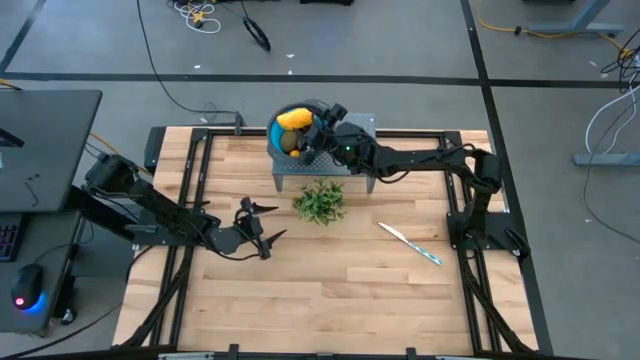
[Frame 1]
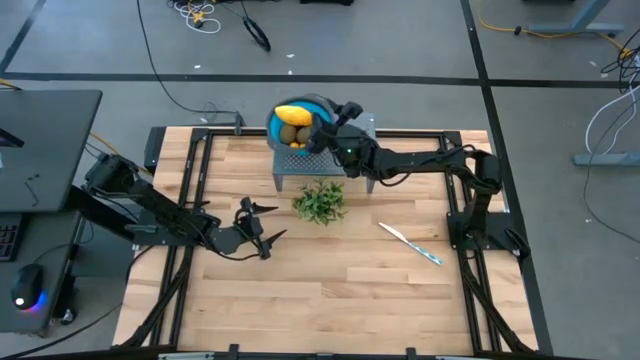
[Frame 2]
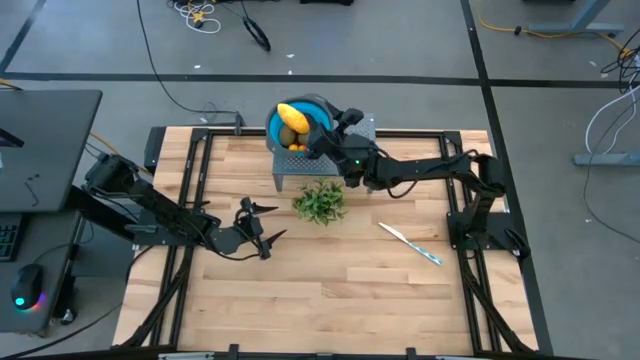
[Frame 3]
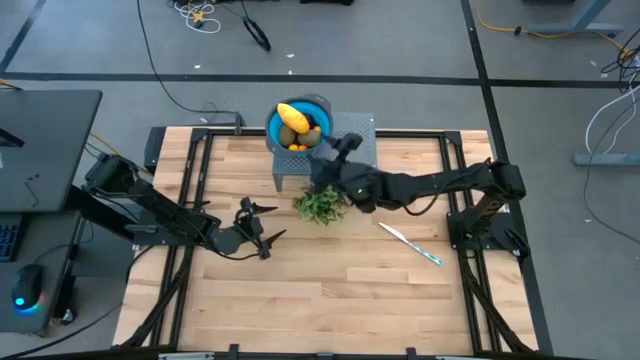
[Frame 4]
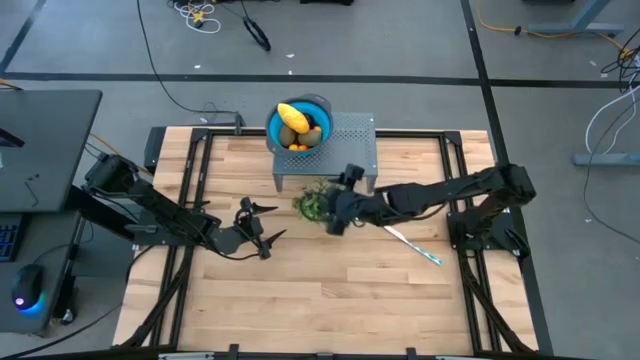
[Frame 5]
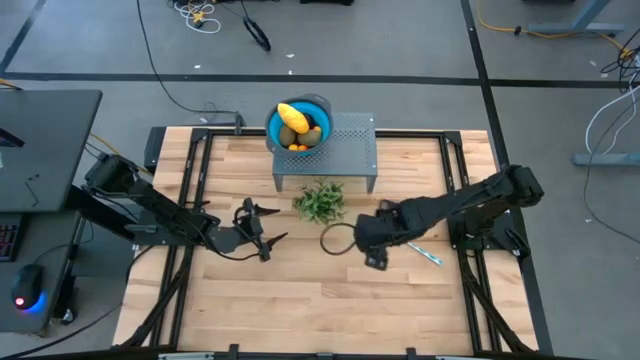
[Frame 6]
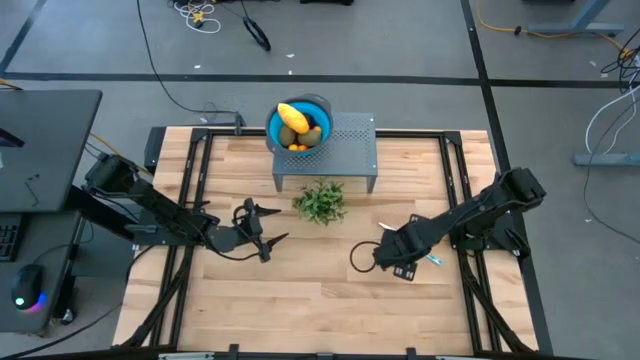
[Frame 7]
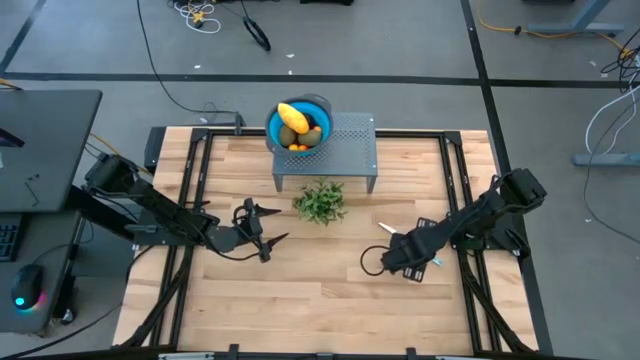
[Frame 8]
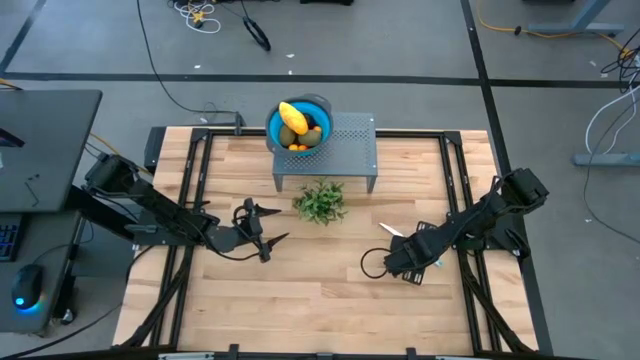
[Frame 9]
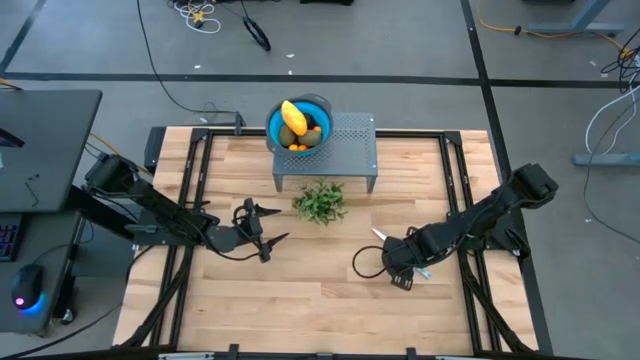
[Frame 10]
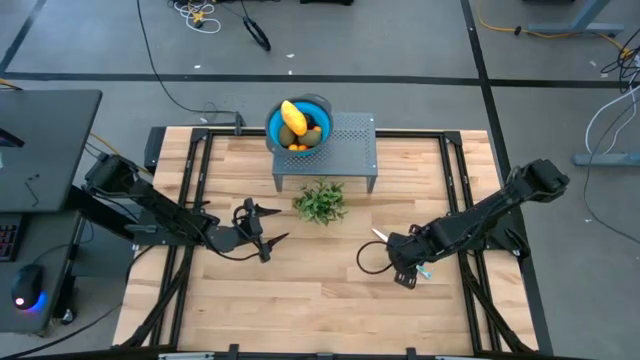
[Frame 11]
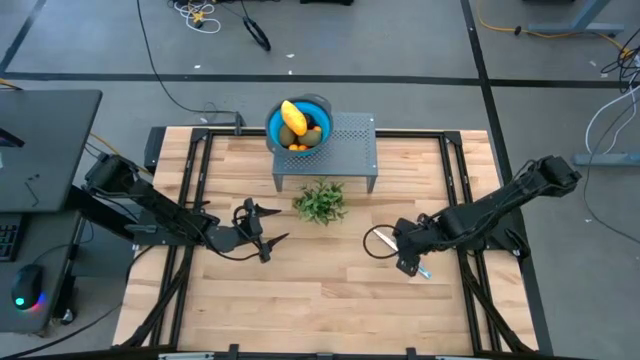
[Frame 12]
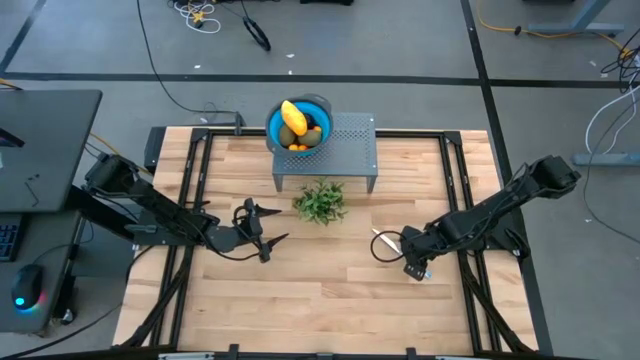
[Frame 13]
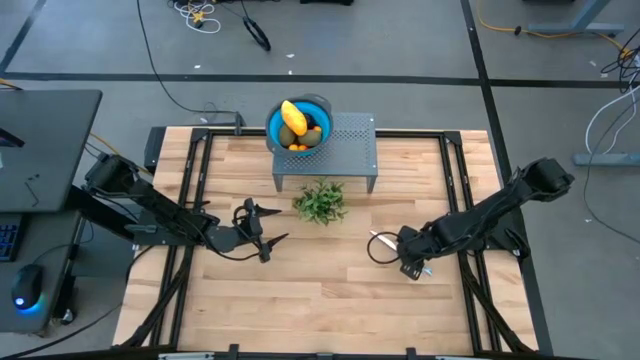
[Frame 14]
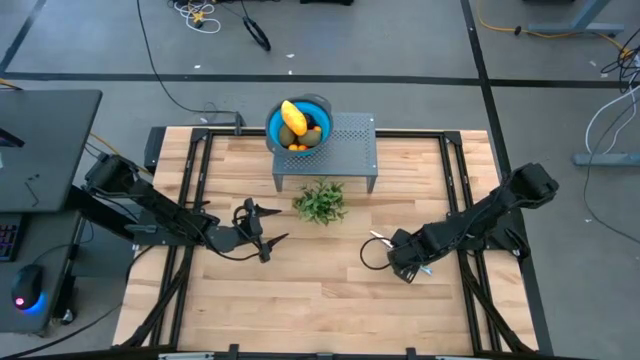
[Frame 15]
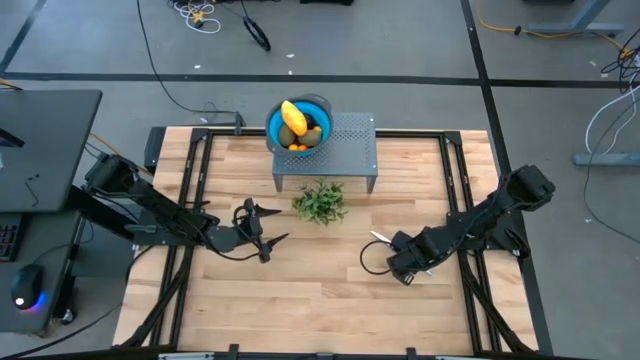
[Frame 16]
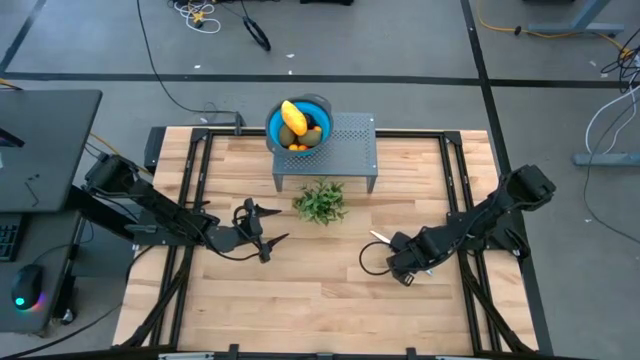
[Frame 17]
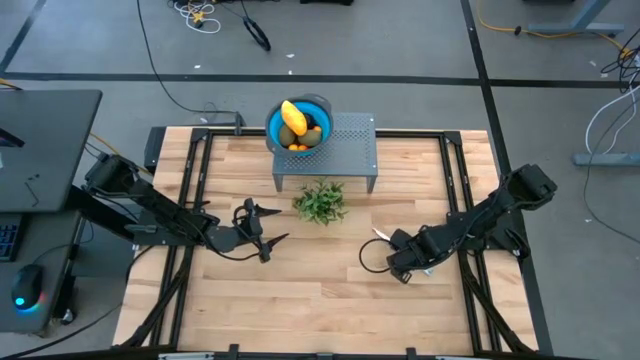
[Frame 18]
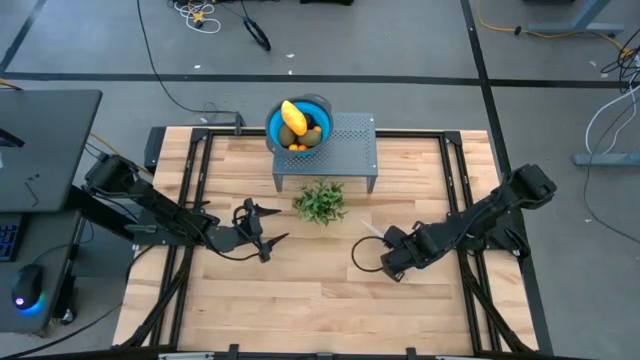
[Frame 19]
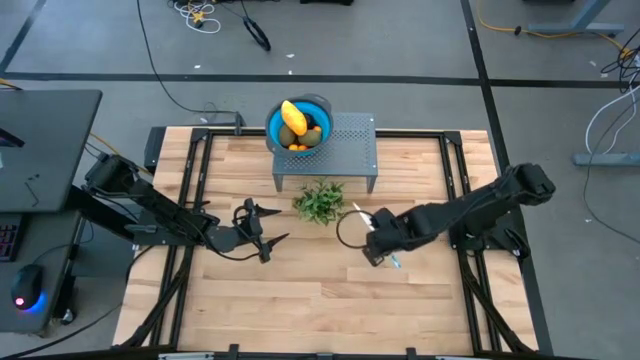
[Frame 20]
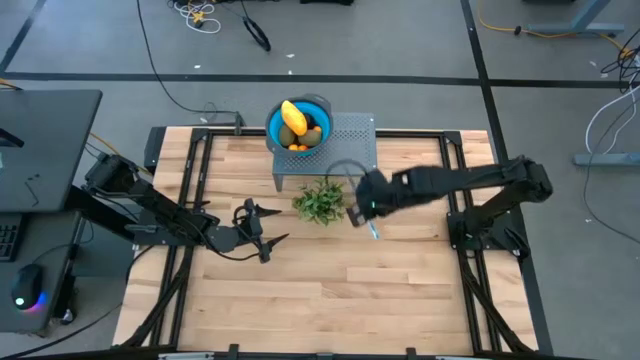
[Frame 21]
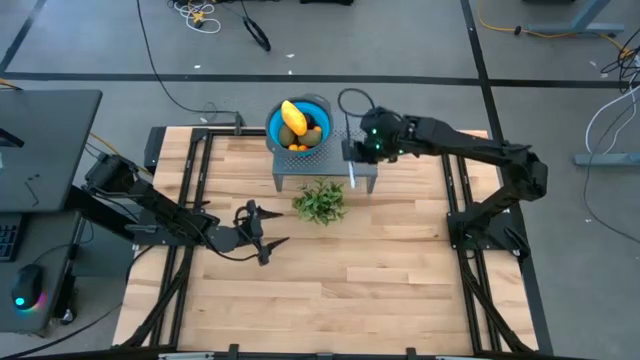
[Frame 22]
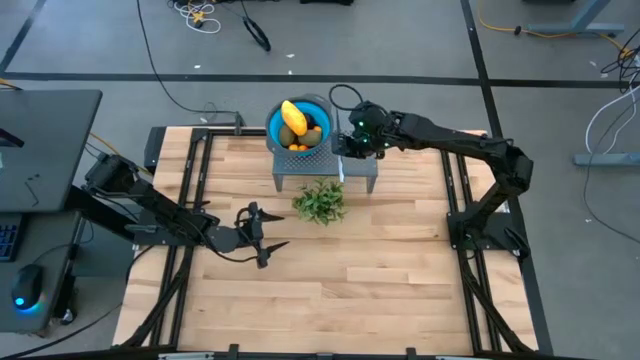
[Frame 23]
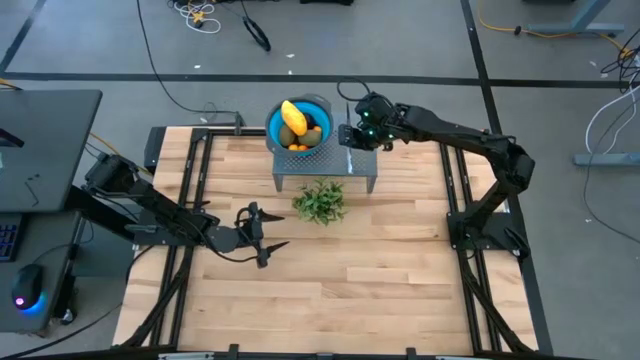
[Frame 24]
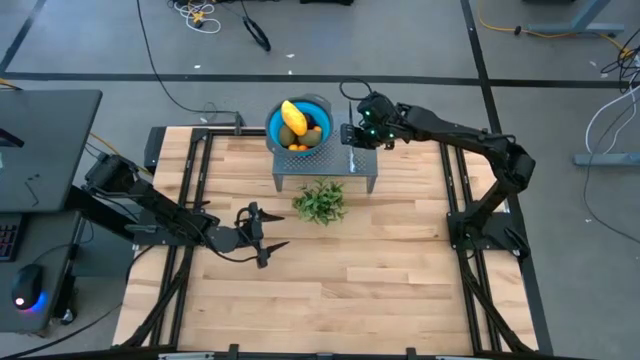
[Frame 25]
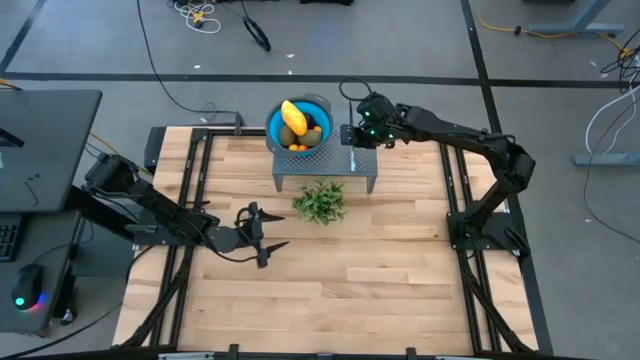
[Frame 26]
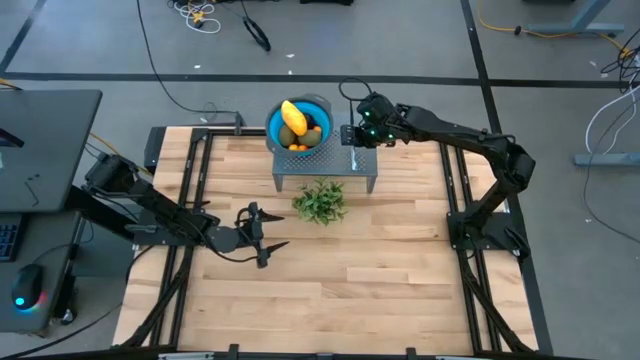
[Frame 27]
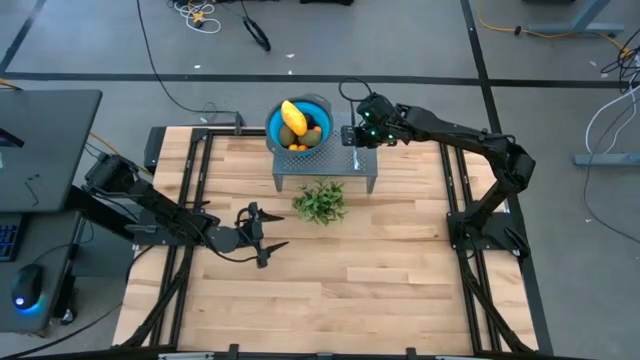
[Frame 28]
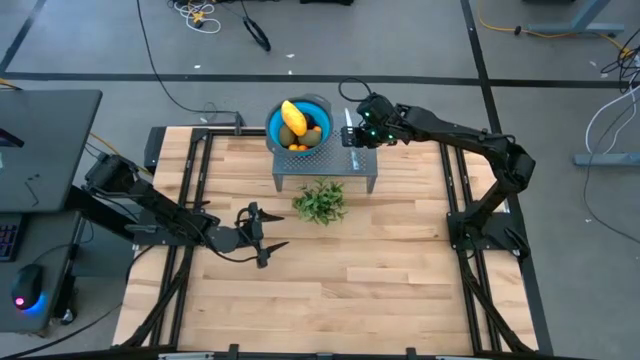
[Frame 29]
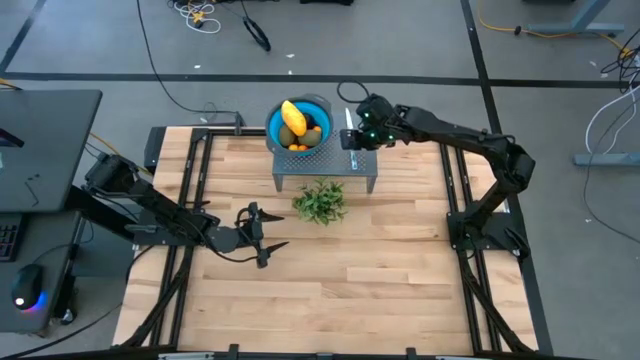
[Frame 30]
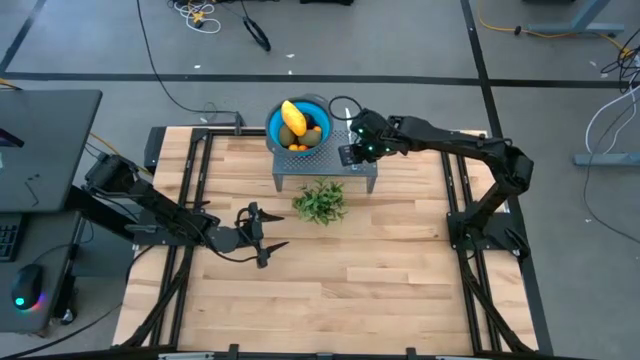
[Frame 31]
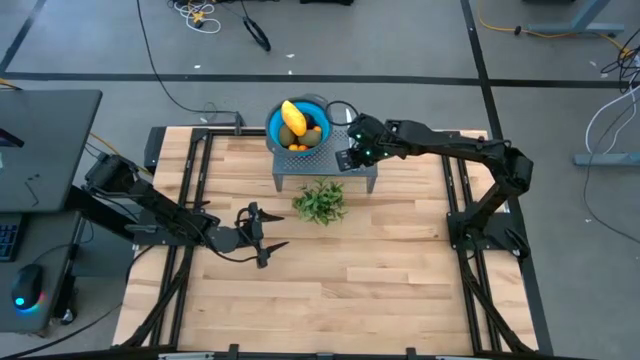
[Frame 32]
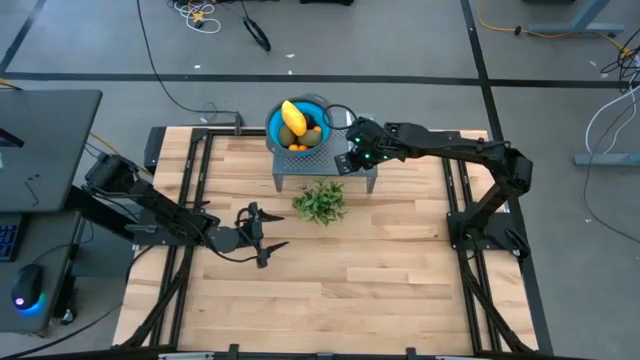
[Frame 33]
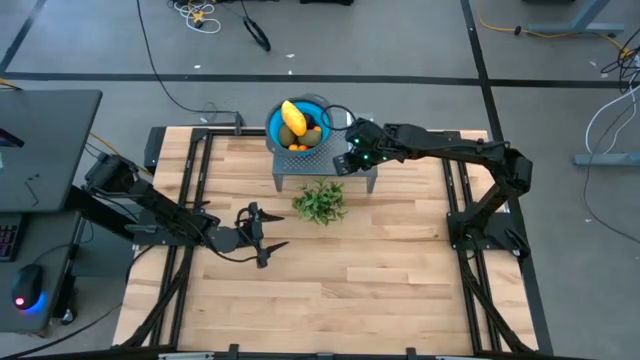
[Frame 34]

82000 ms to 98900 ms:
Task: Pick & Place Fruit
Put the blue knife on the shelf

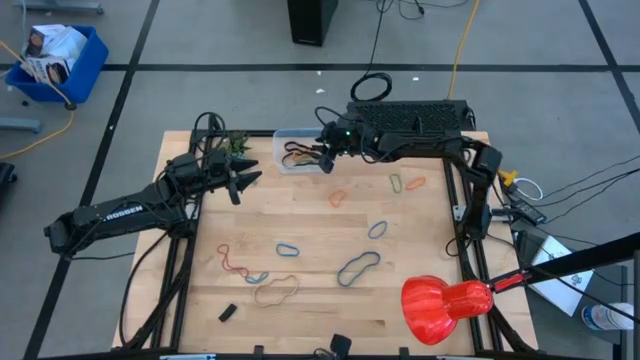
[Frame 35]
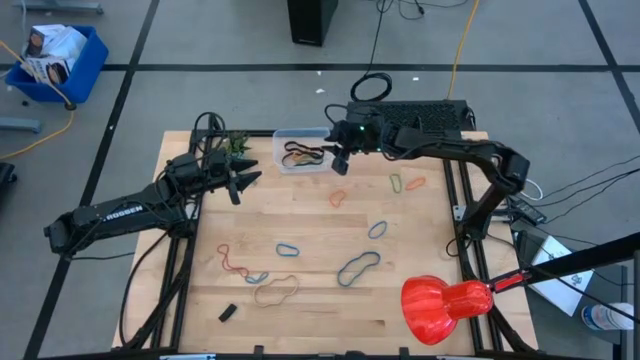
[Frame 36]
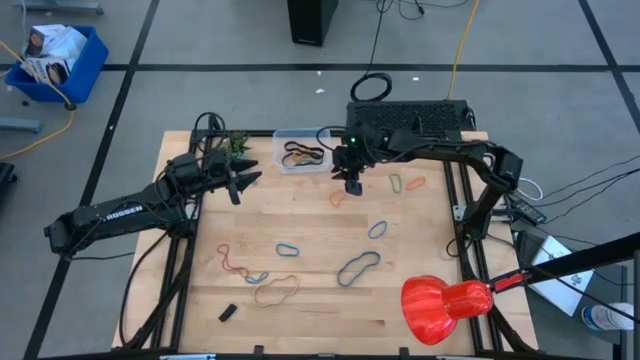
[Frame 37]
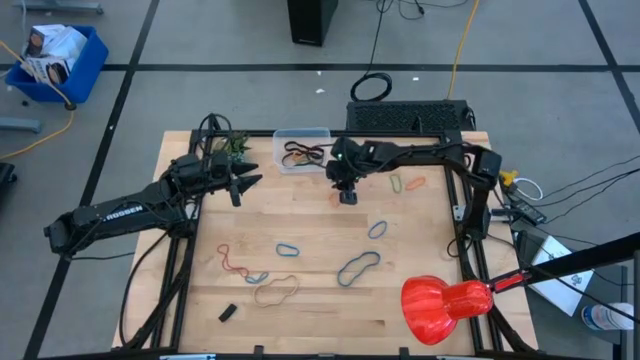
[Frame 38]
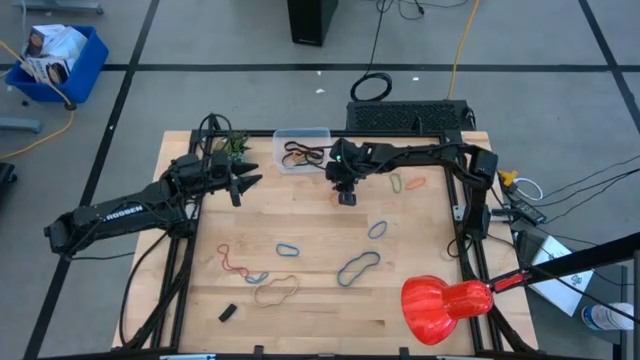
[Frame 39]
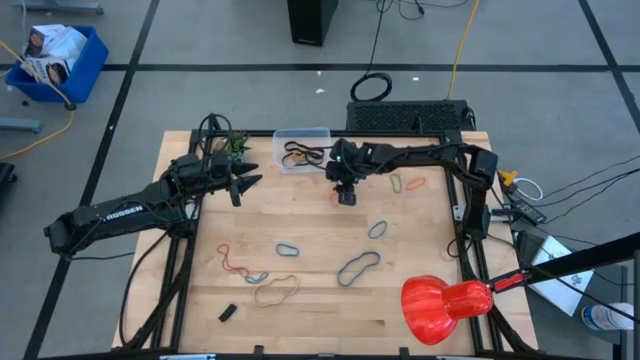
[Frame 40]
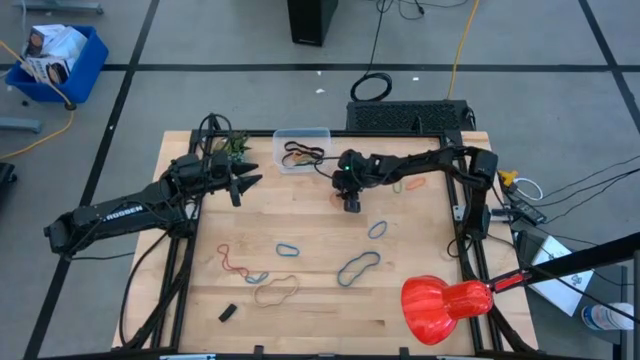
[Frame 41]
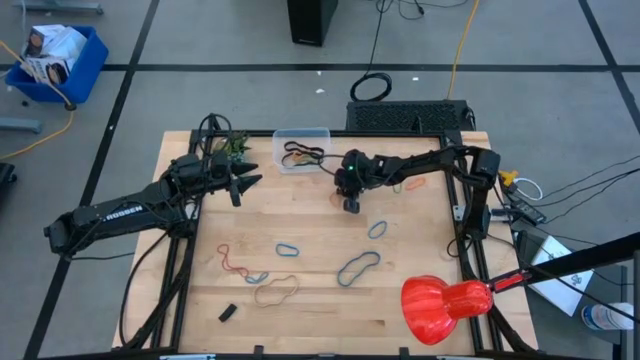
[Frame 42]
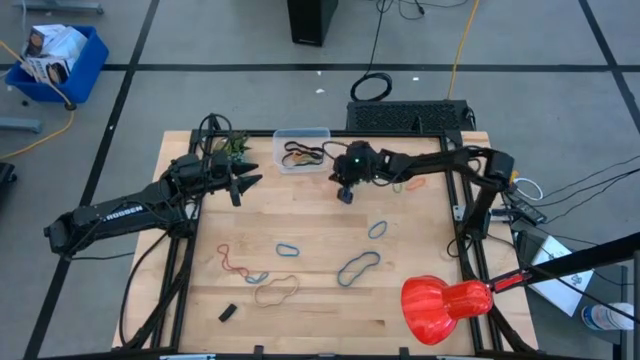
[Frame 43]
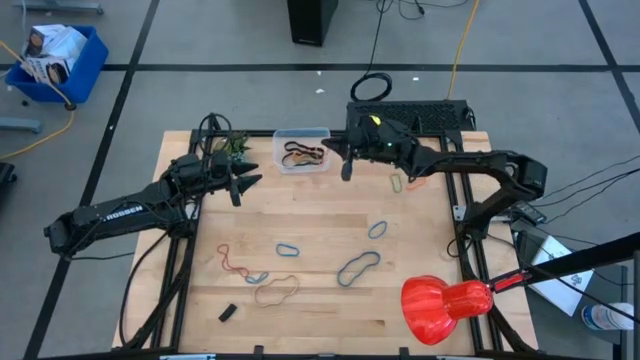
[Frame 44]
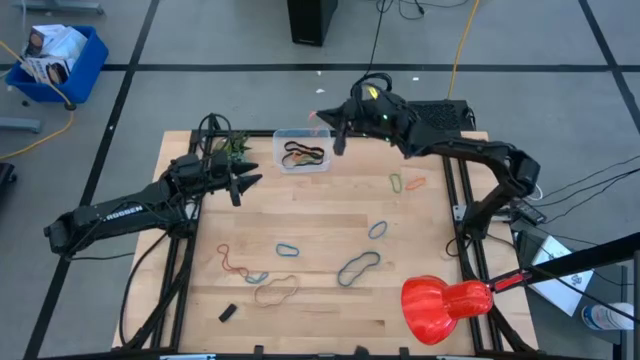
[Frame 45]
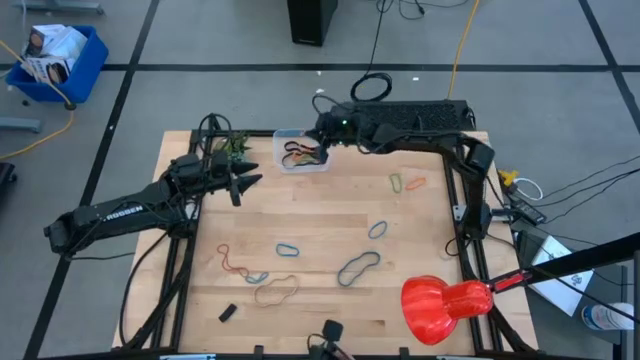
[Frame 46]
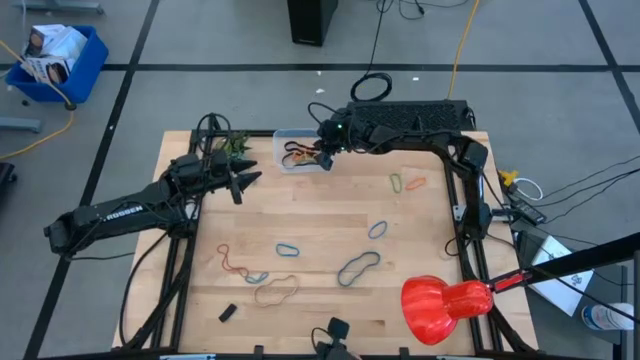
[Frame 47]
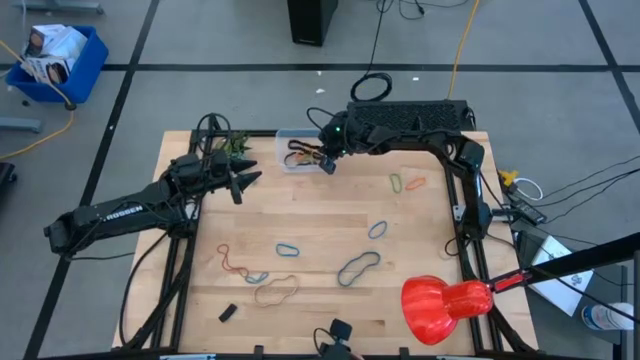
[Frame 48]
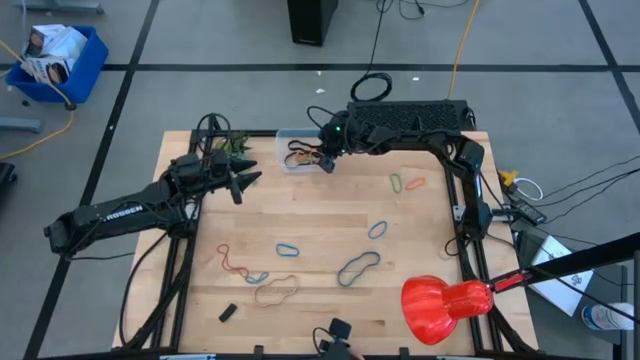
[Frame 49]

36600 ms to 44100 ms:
Task: Pick and place rubber bands into bin
Put the left orange rubber band into the transparent bin
